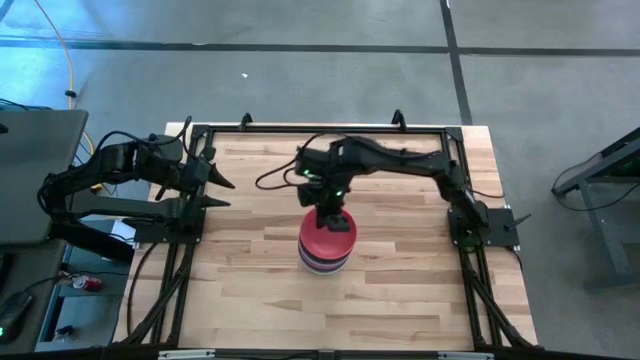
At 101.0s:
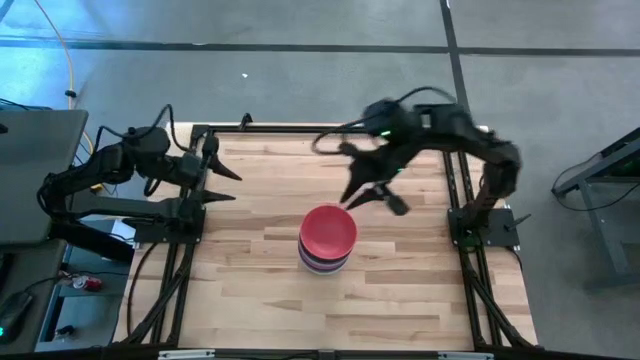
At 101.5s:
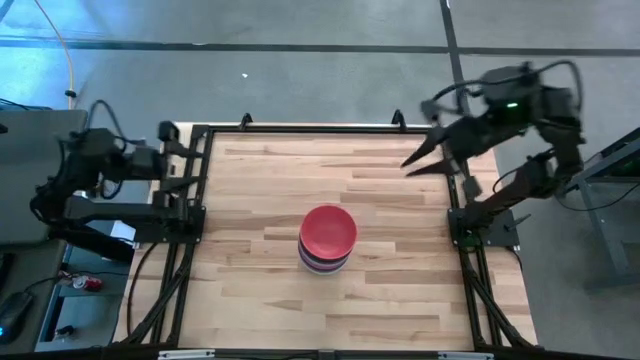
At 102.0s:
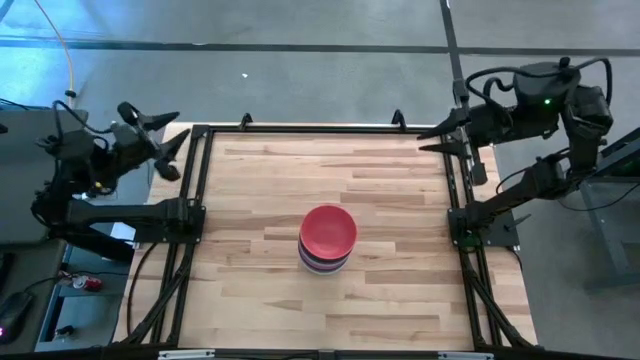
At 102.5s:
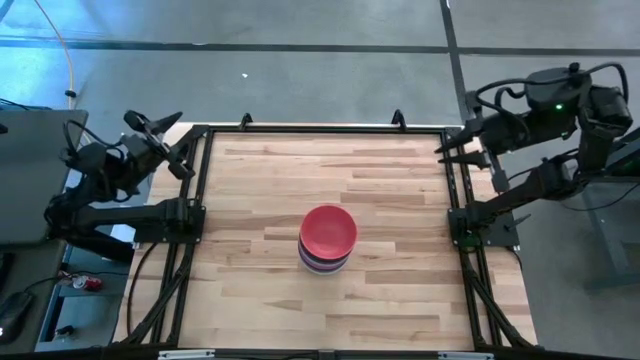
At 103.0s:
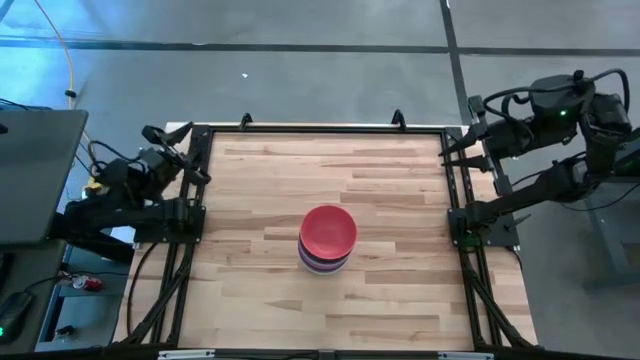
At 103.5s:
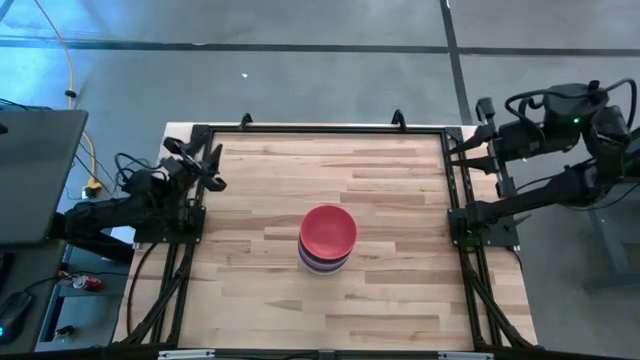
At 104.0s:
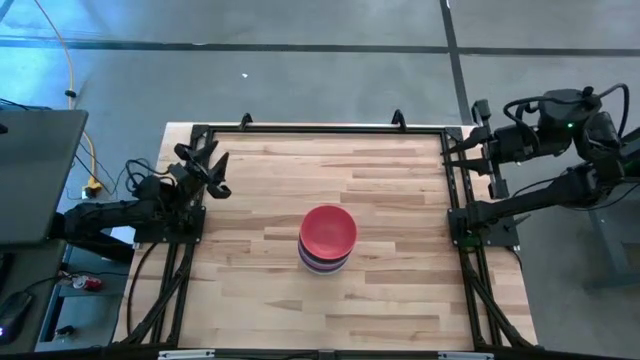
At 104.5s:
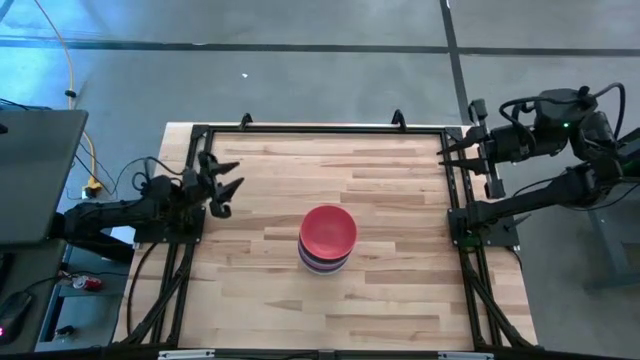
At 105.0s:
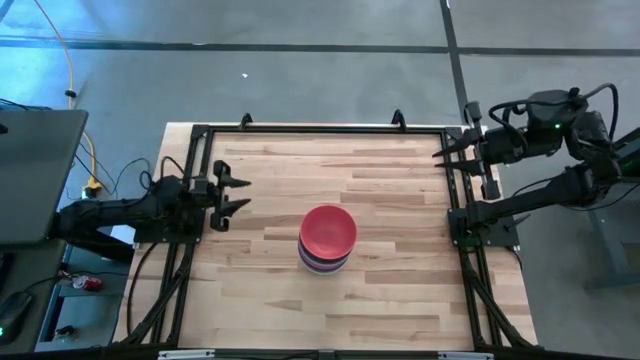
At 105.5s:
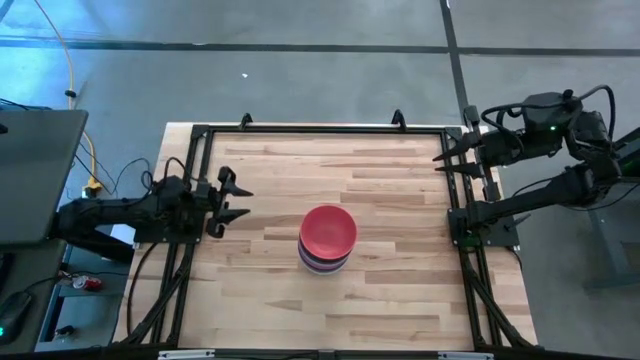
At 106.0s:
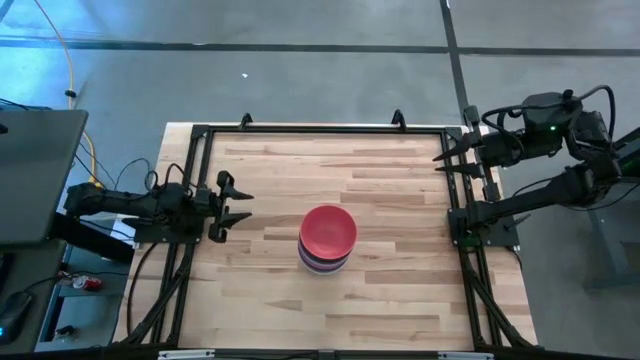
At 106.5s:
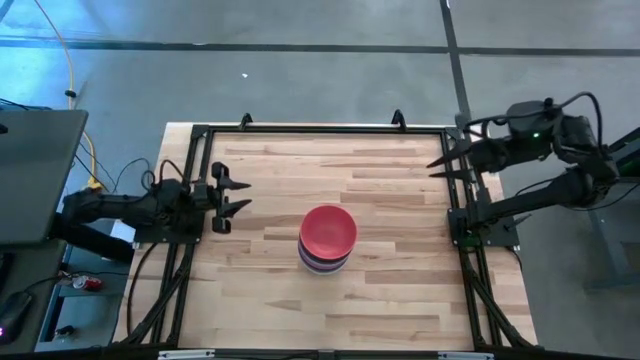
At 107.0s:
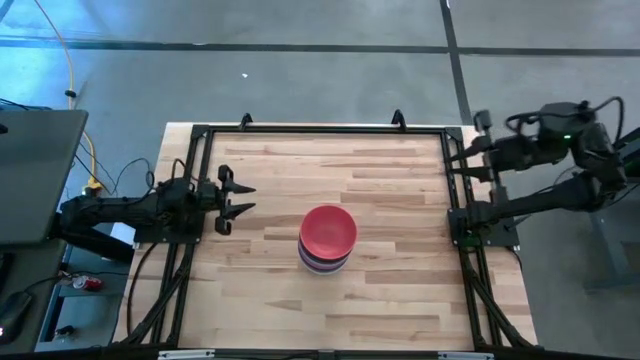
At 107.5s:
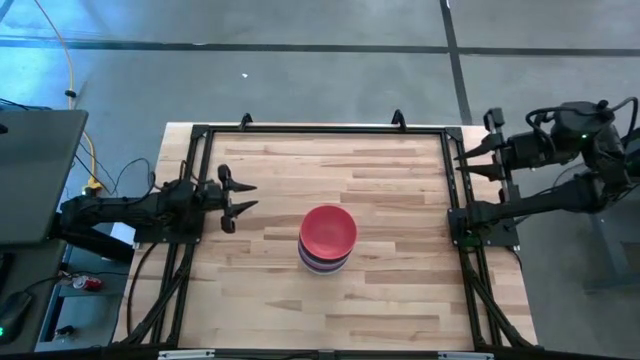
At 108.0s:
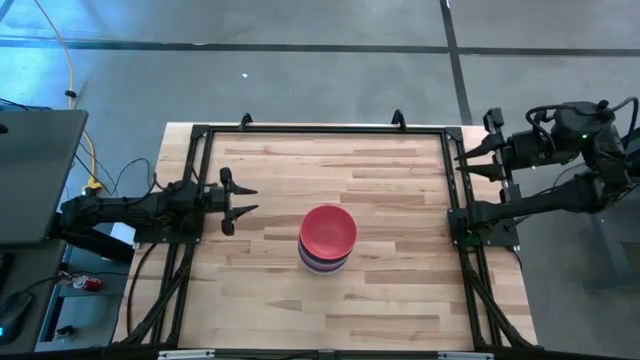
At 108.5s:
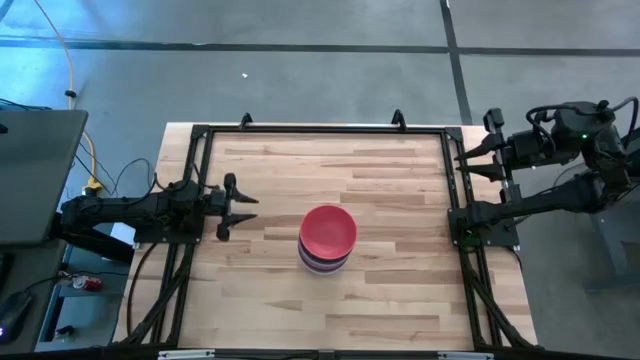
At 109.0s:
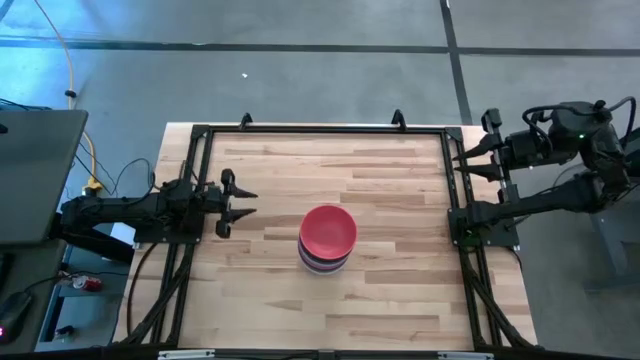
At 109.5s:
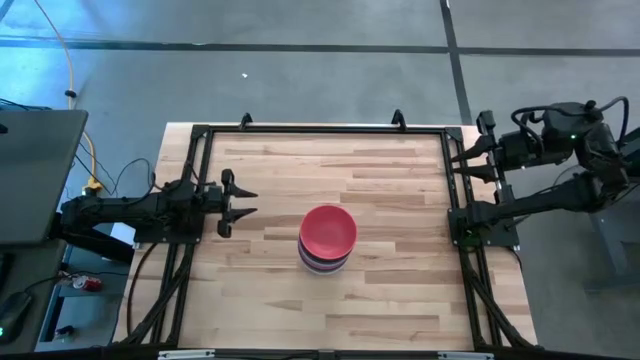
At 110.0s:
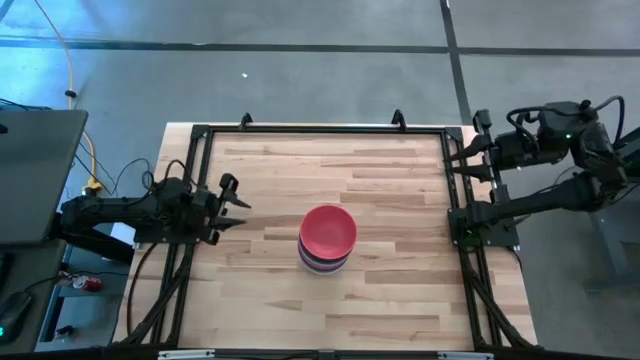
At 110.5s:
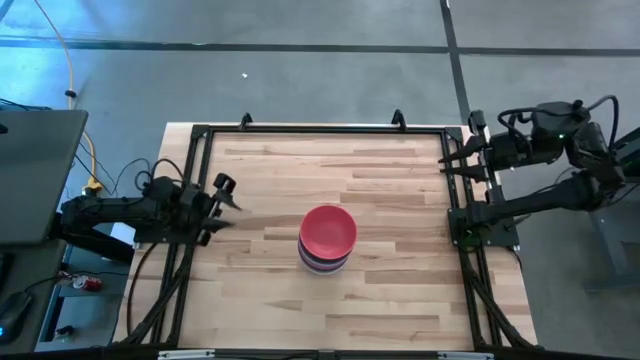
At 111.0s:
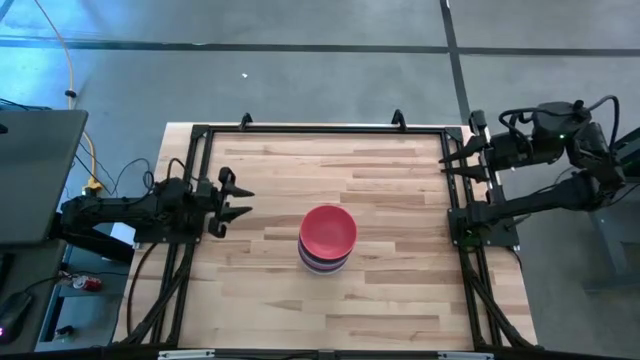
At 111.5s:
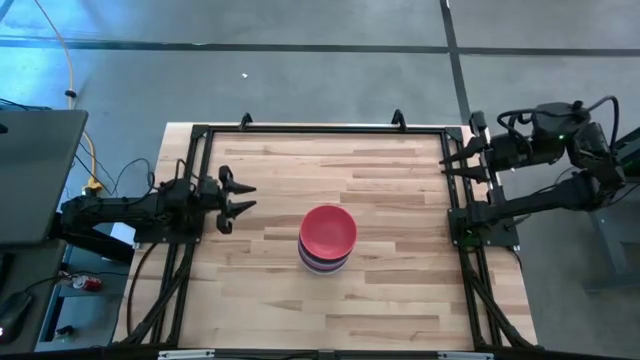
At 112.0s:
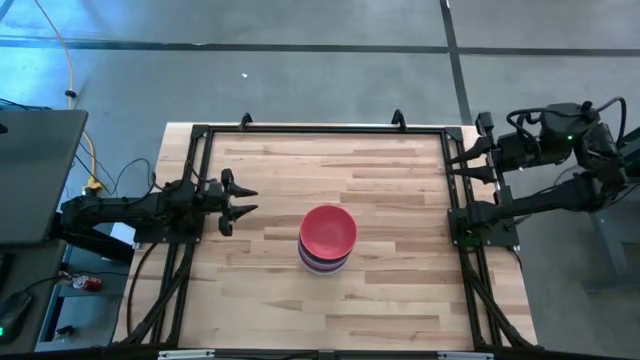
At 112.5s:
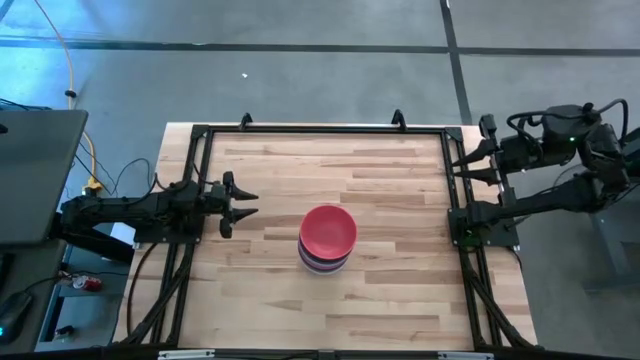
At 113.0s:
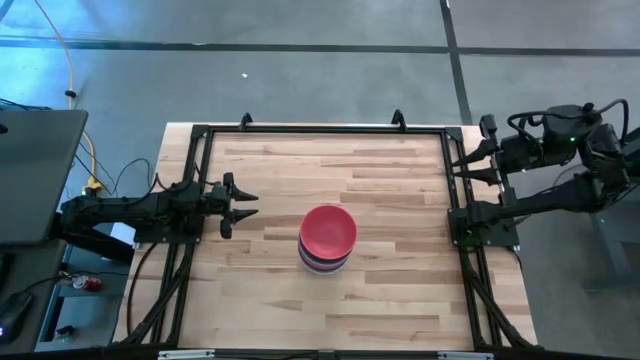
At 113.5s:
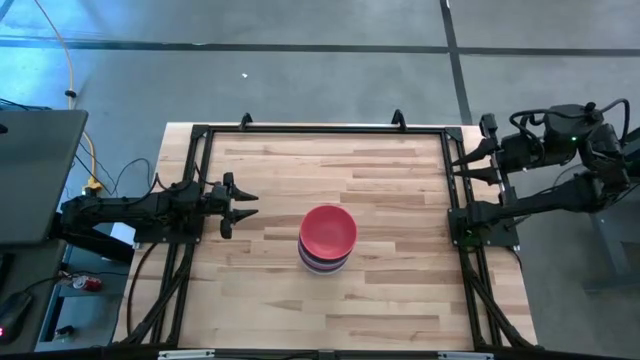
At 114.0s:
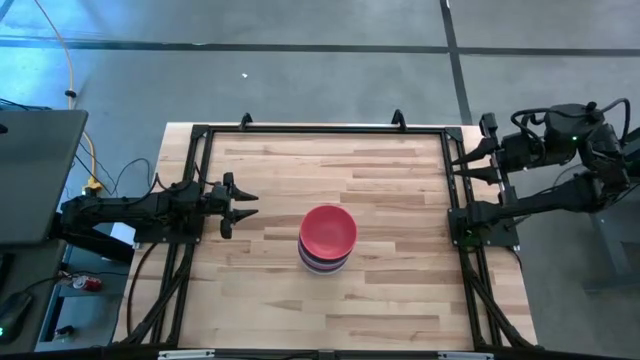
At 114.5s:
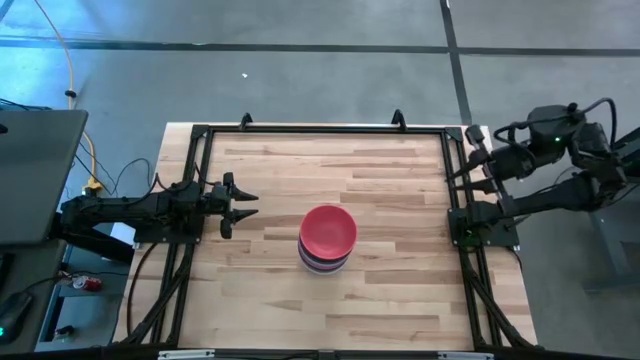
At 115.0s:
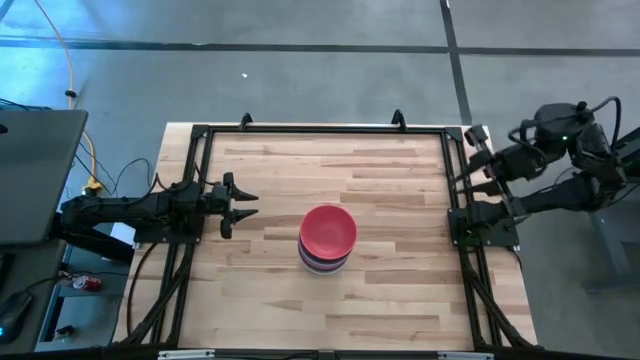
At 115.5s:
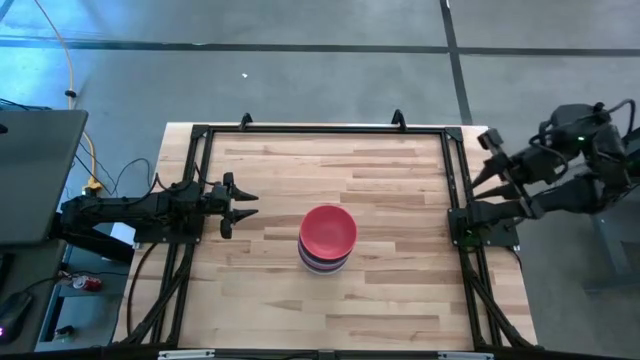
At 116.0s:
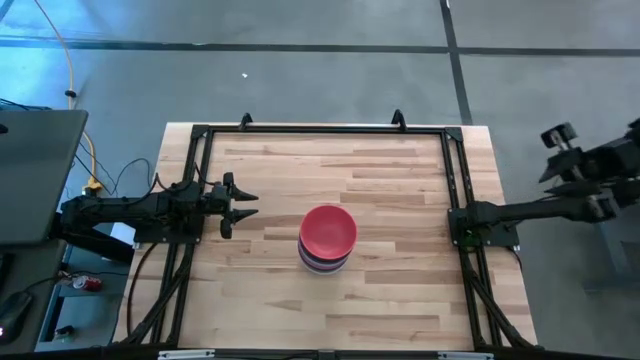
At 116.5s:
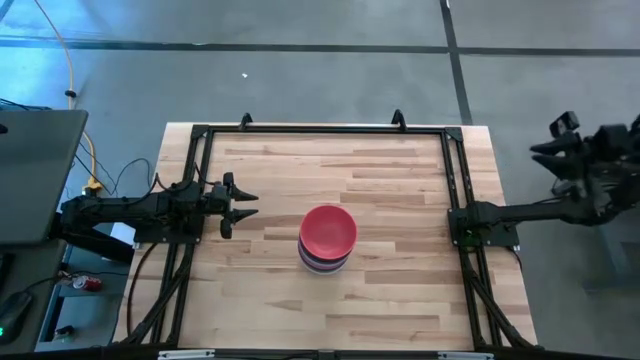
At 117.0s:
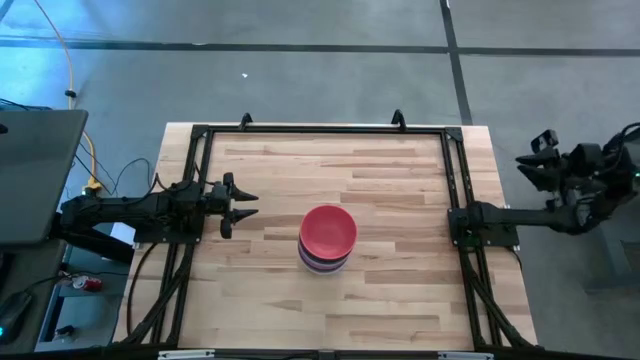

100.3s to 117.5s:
Task: Nest bowls inside each other
Return to Home Position

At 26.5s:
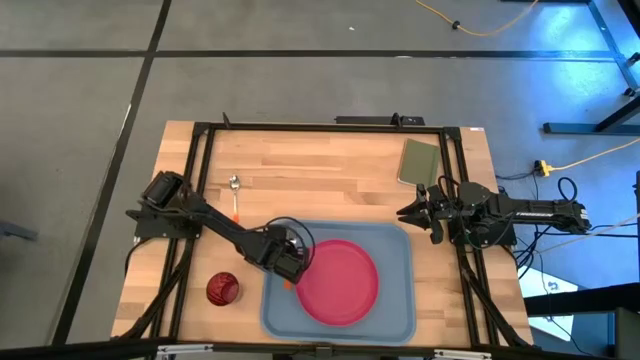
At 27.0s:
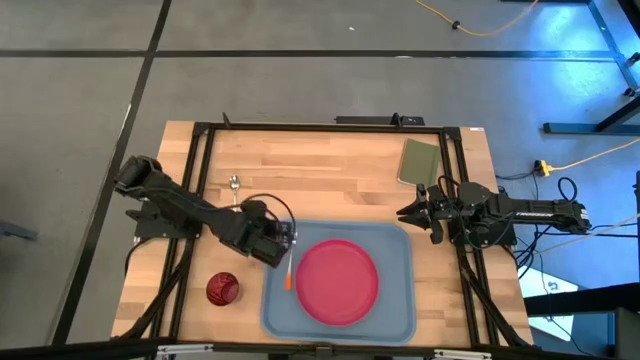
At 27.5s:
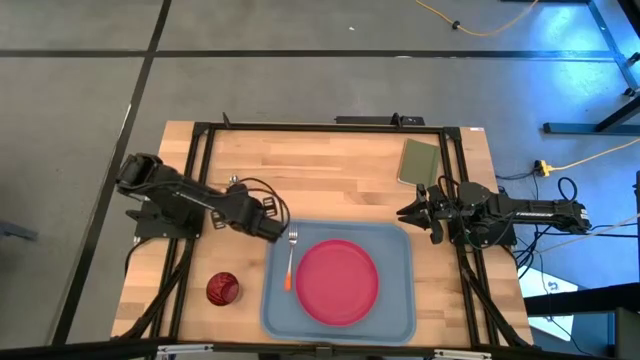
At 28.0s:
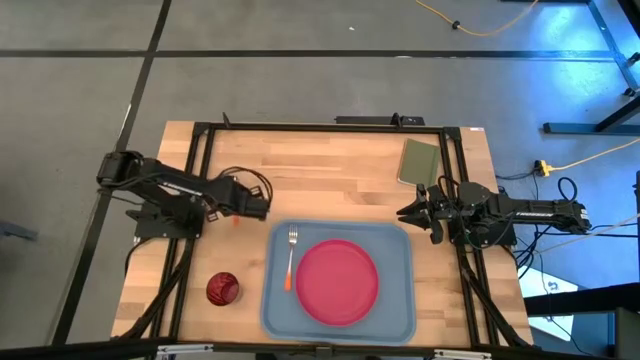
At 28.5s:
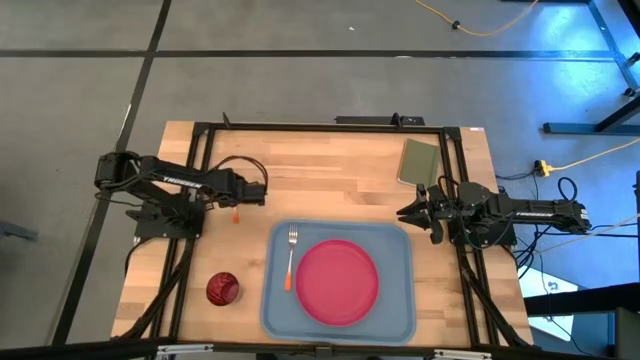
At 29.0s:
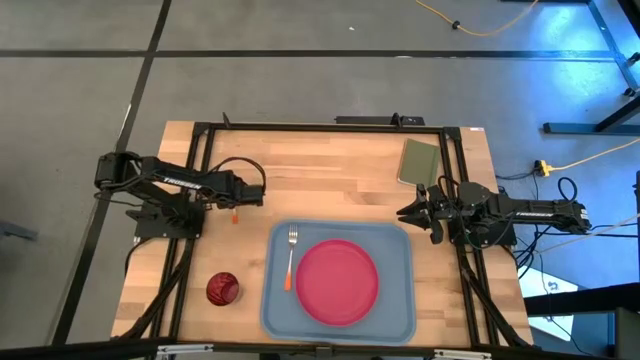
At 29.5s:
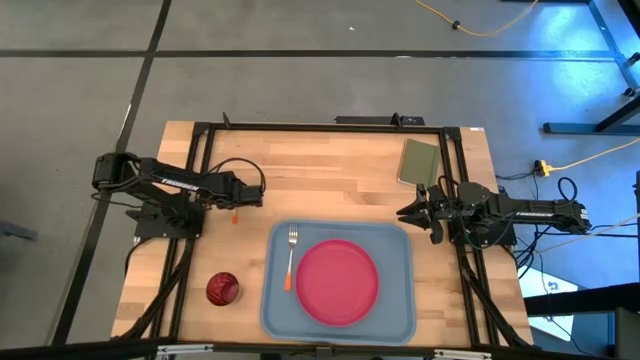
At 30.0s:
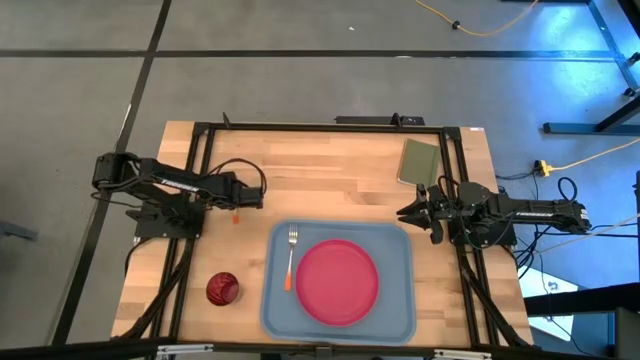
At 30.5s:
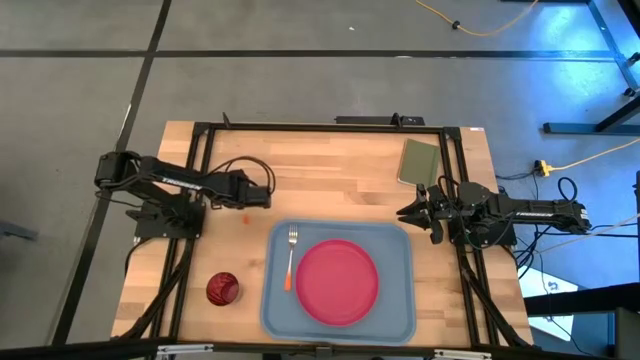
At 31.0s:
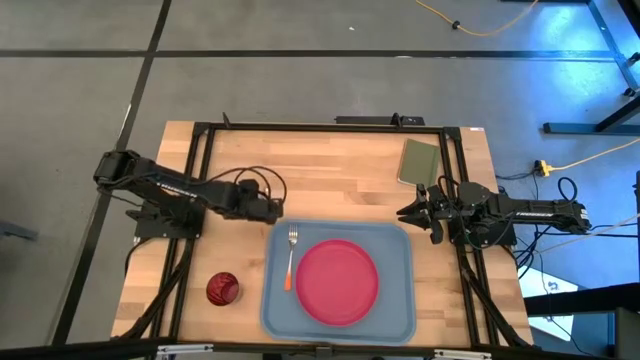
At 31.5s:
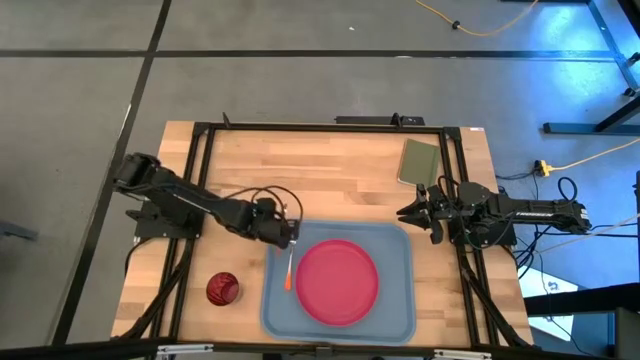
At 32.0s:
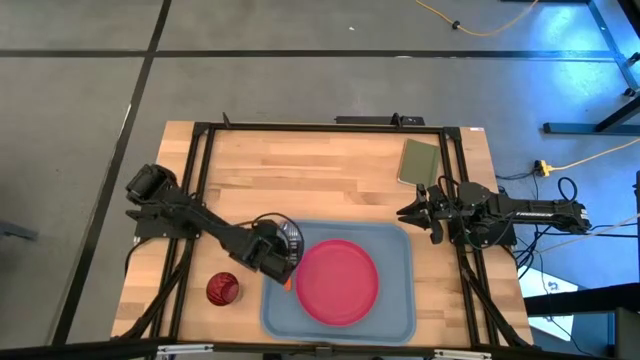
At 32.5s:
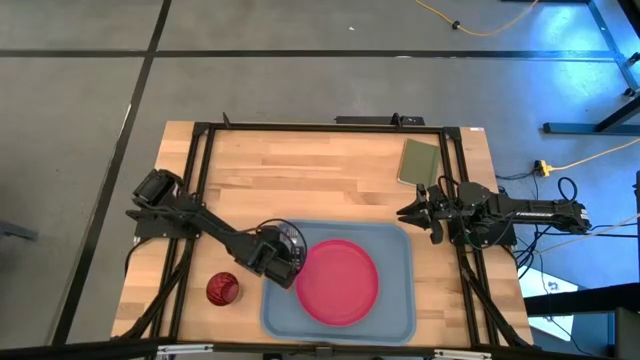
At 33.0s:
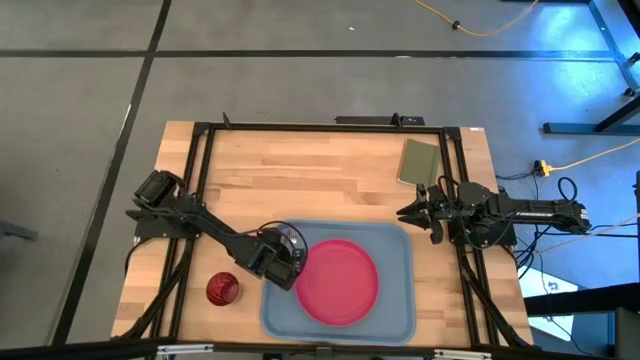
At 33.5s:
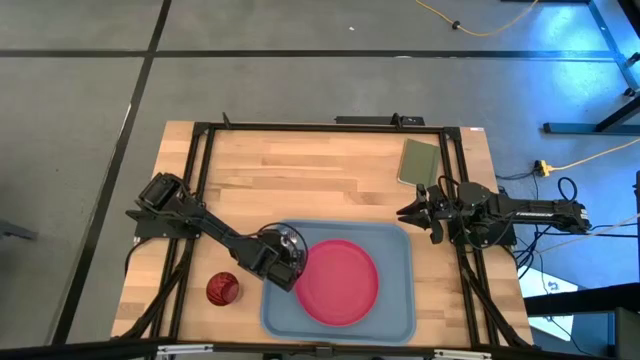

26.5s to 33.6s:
Task: Pick and place plate/cup/fork/spoon on tray
Put the orange spoon on the blue tray to the left of the orange fork
